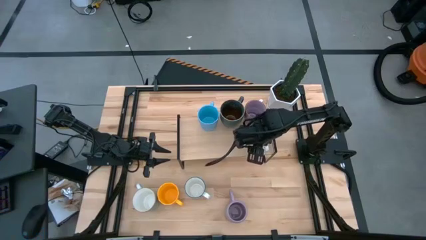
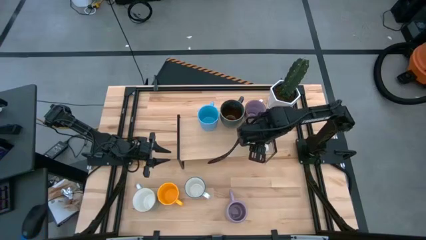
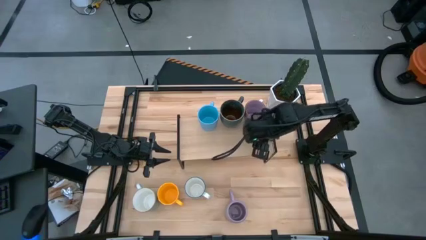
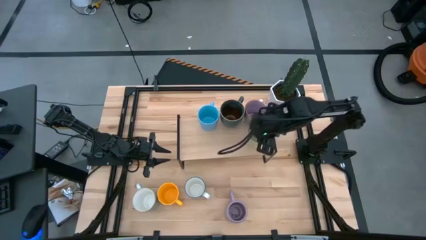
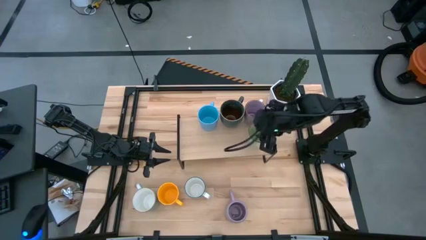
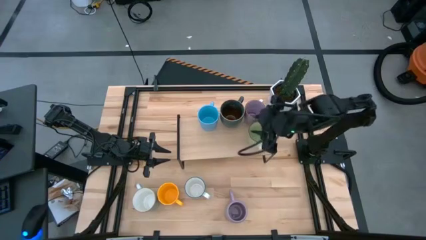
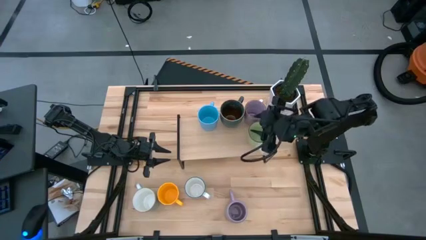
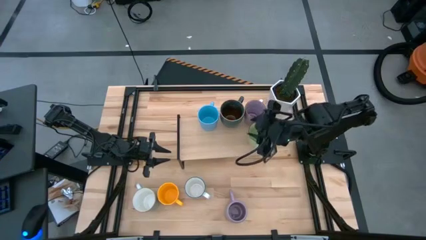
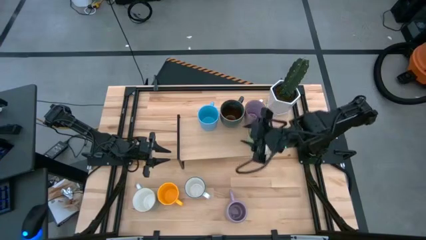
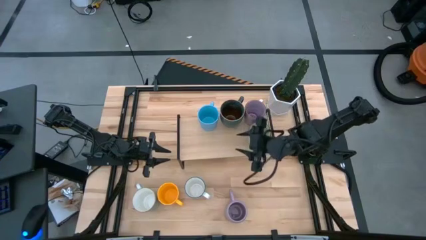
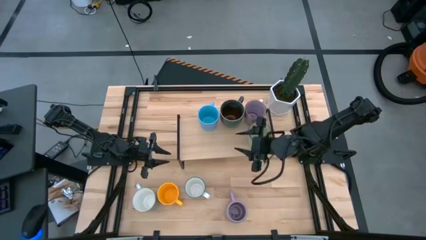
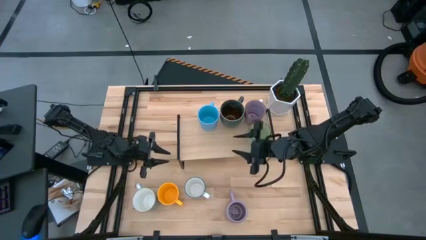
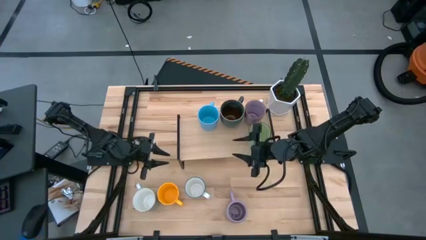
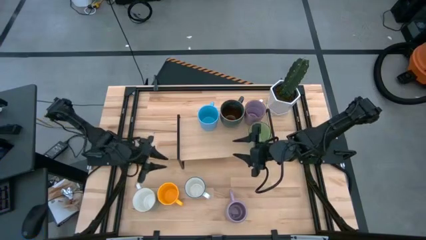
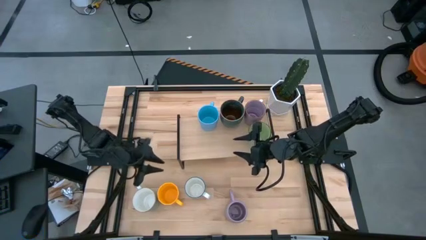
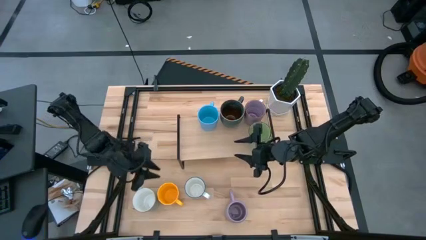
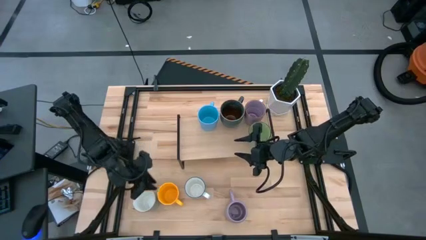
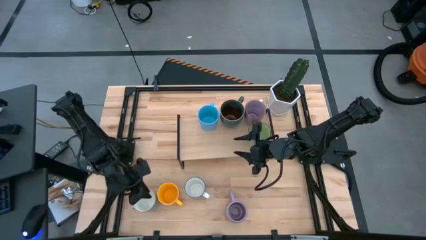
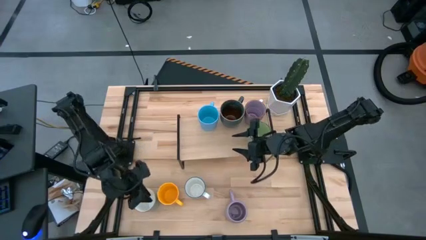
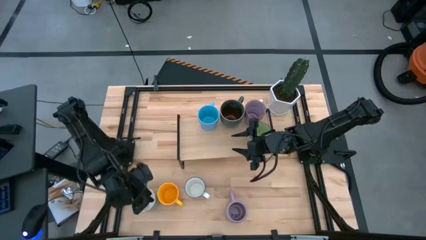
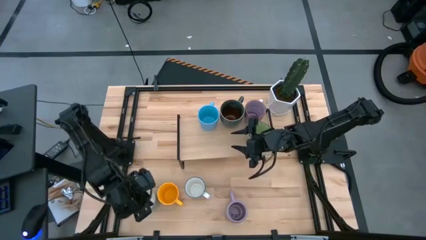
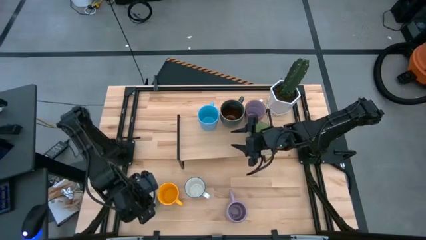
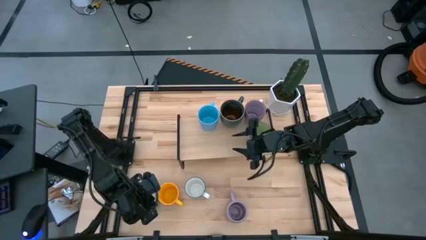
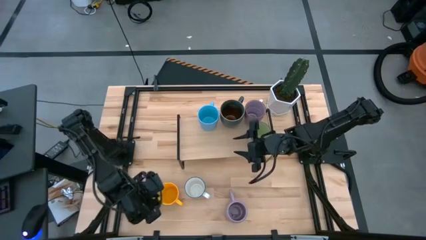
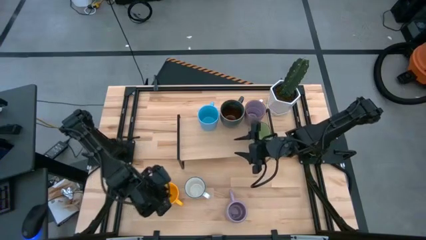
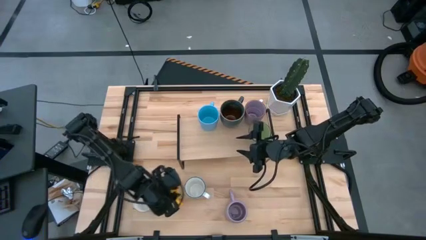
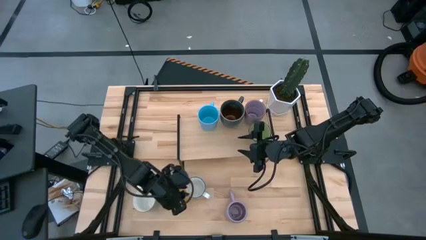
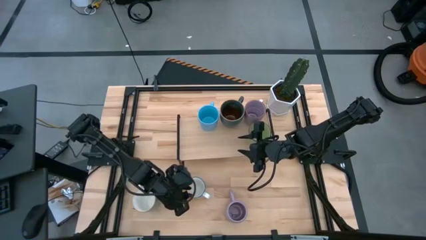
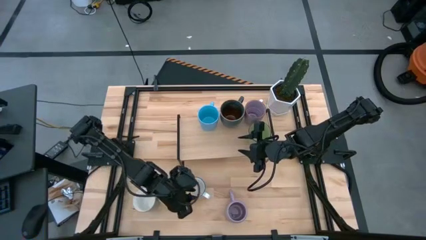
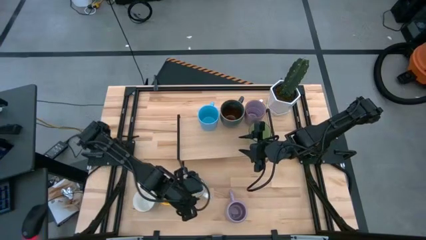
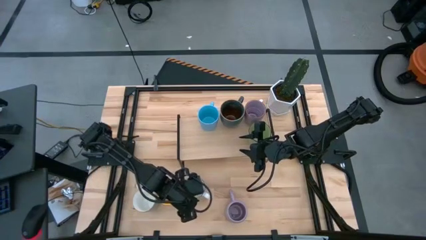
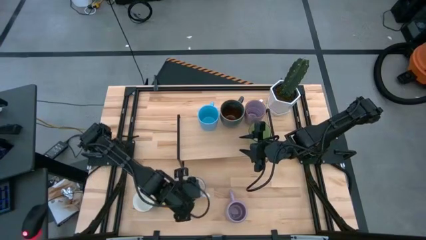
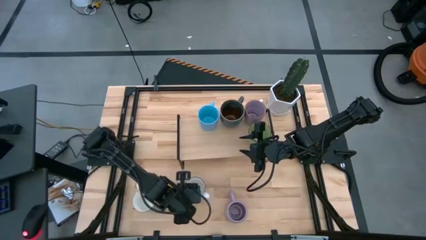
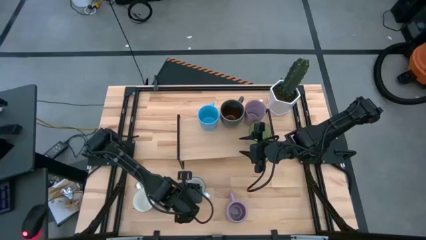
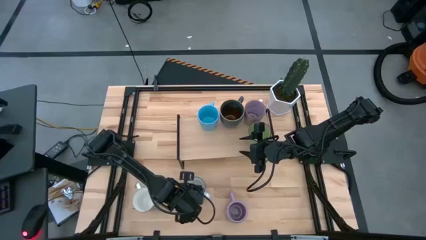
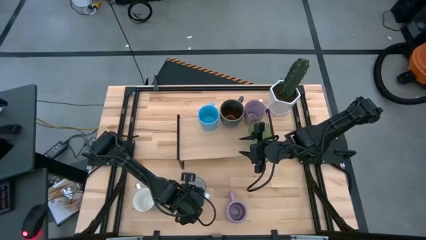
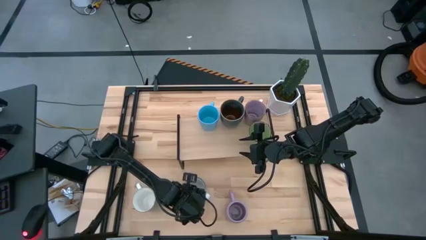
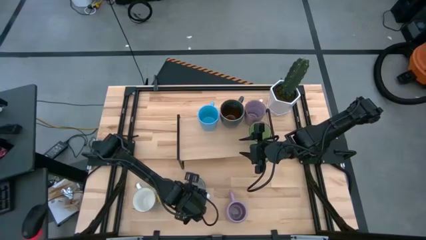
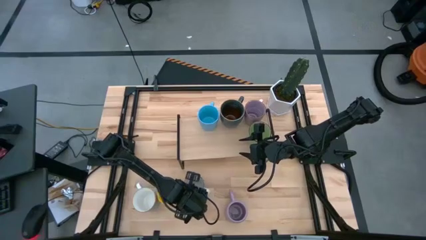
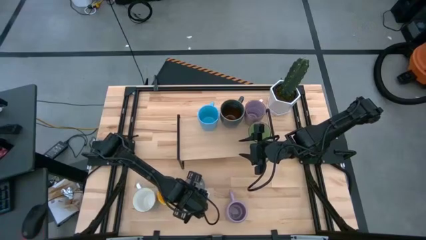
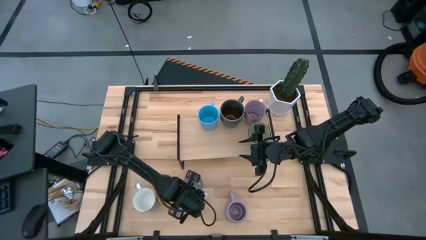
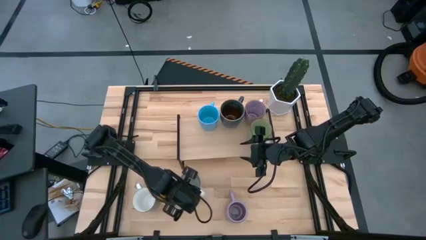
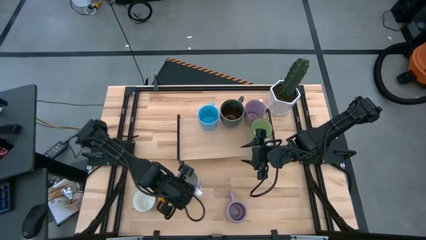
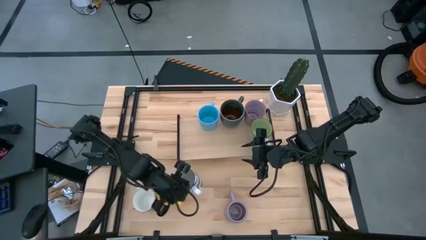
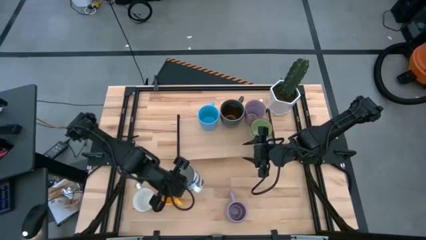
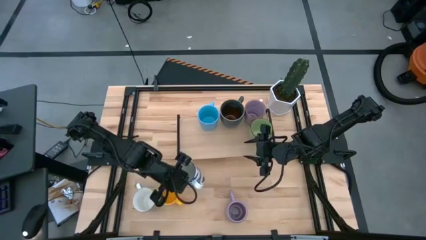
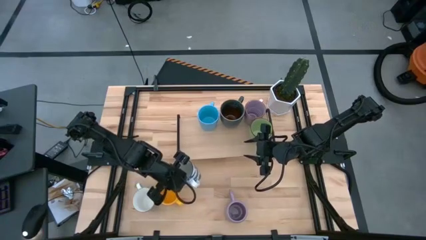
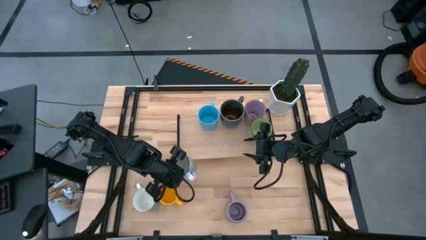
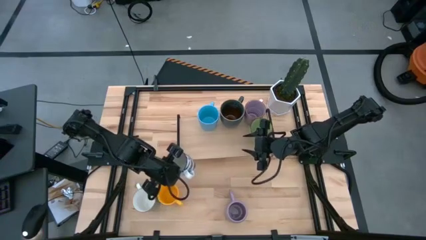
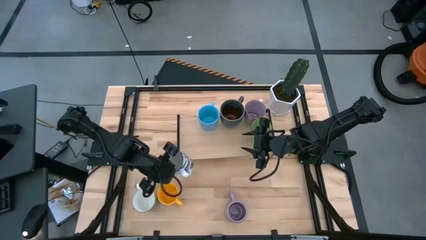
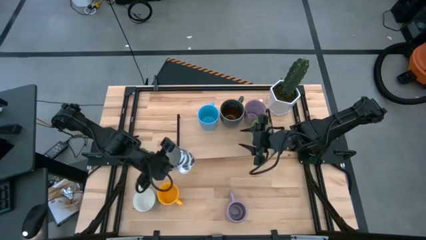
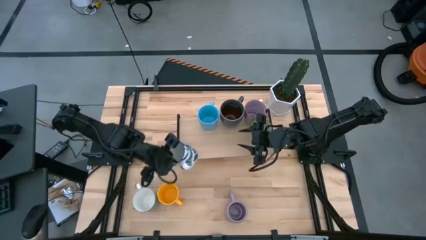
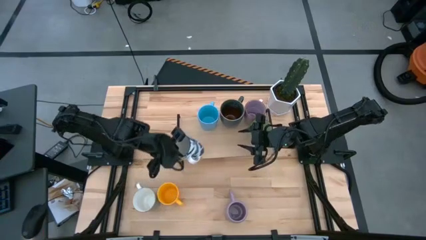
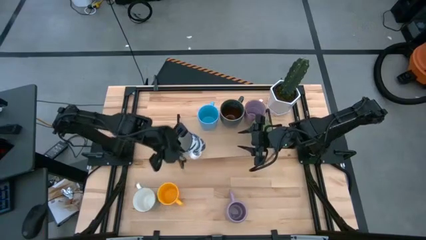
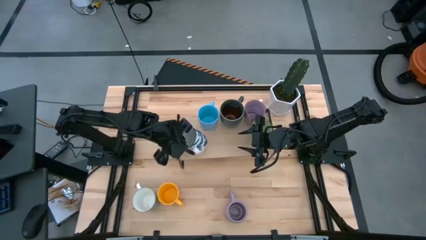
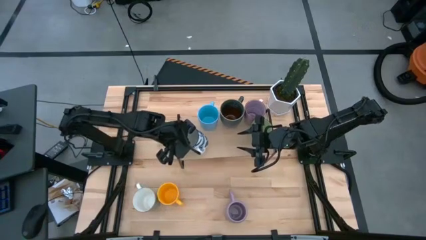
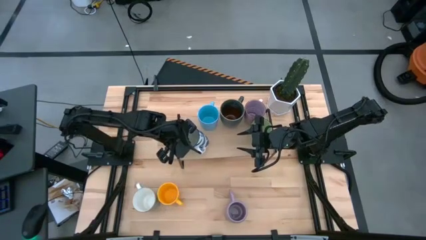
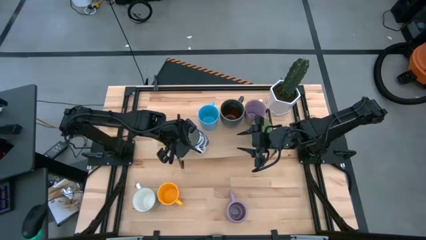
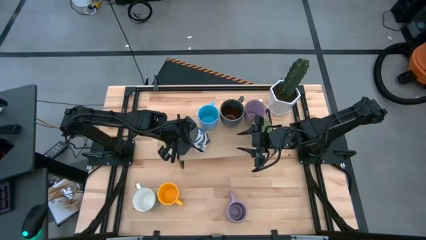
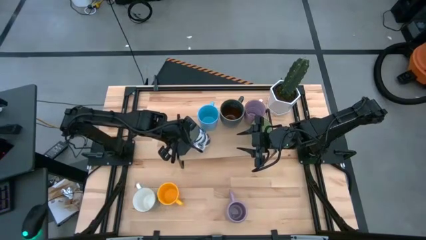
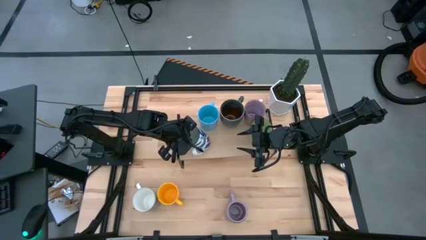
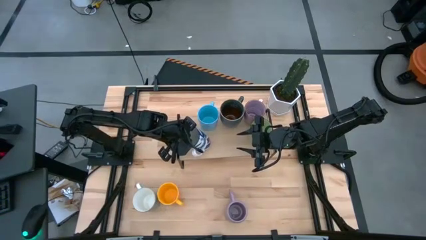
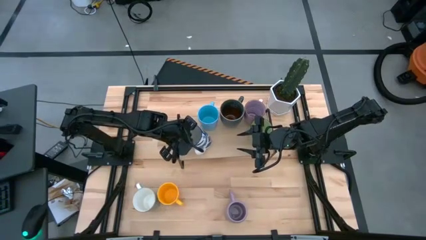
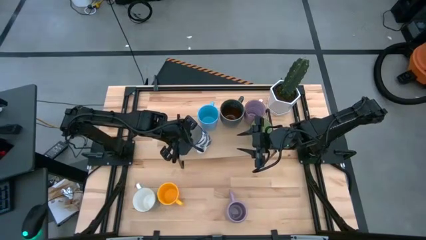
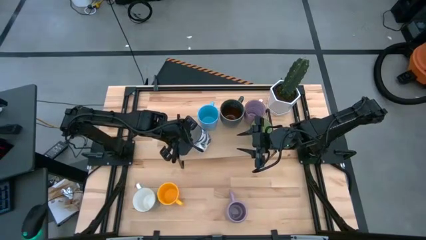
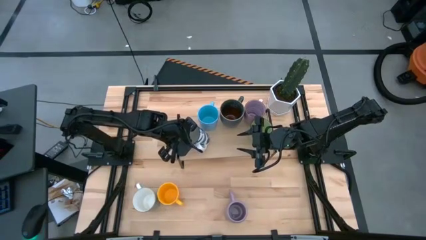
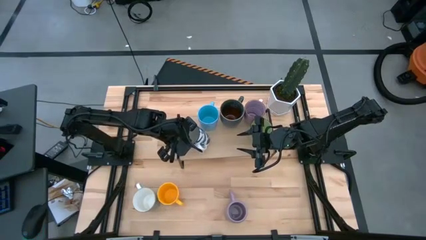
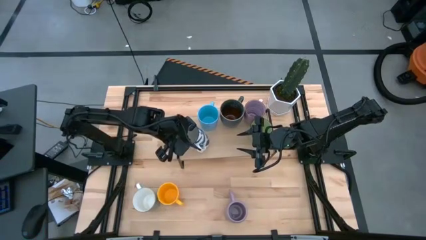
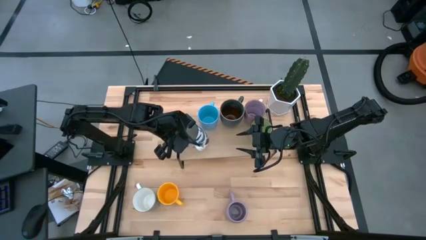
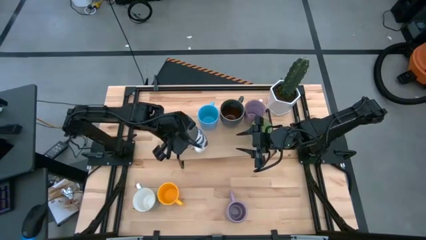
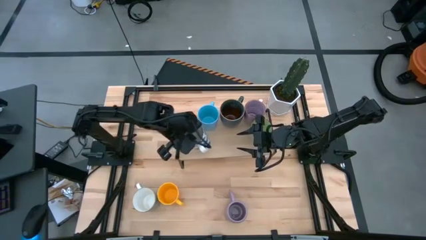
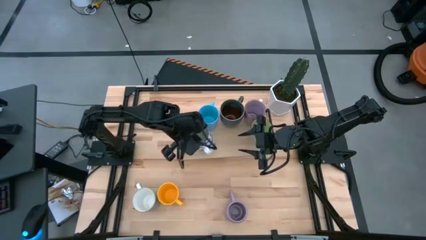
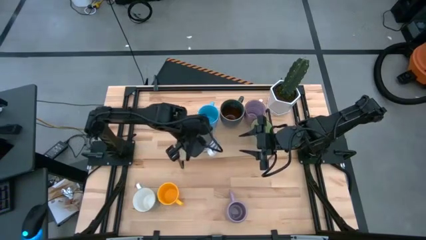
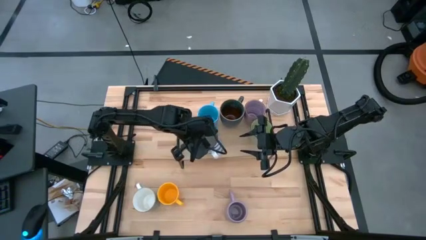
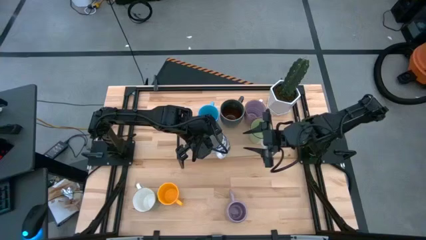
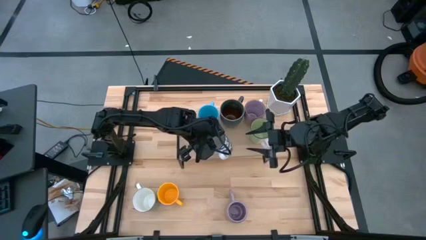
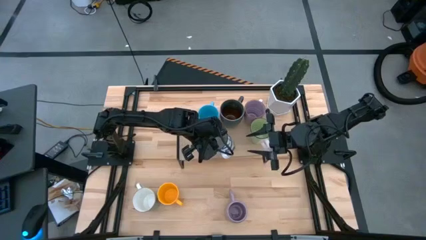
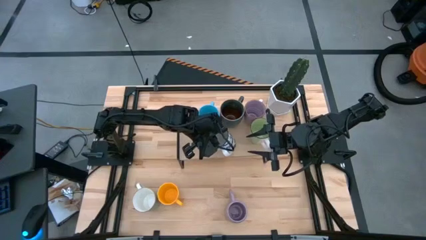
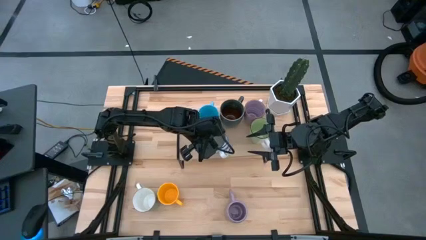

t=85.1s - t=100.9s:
Task: Place coffee mugs
Put the blue patterned mug on the shelf
